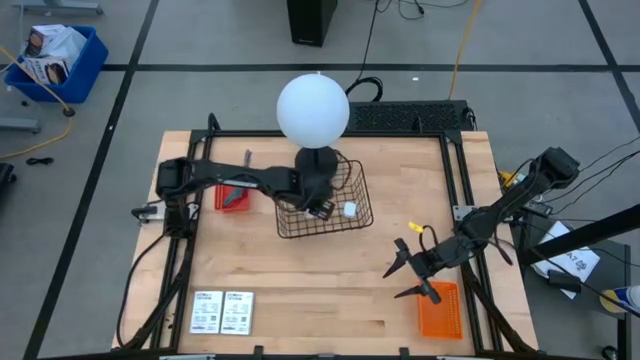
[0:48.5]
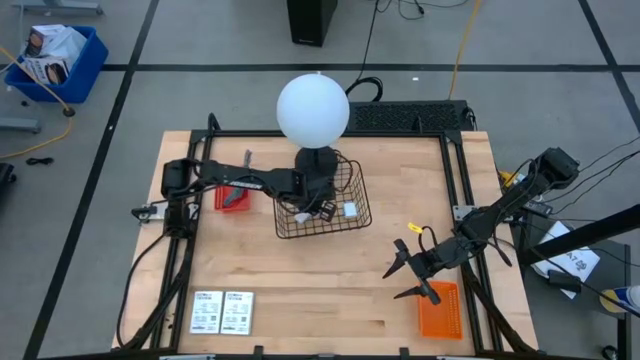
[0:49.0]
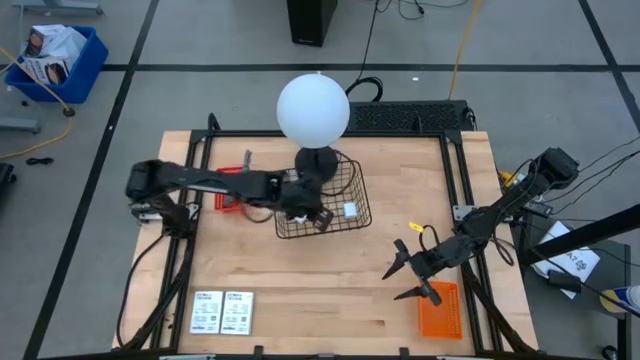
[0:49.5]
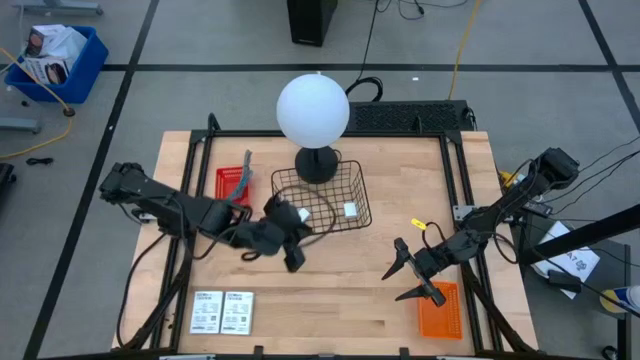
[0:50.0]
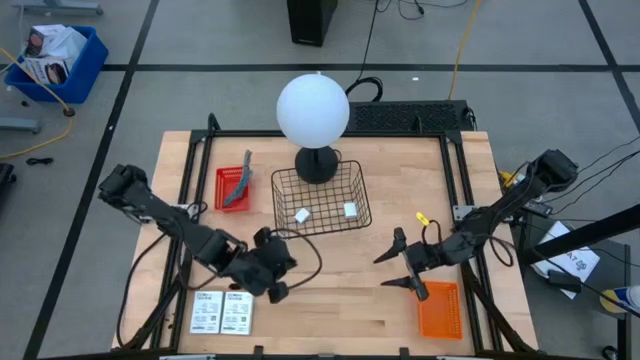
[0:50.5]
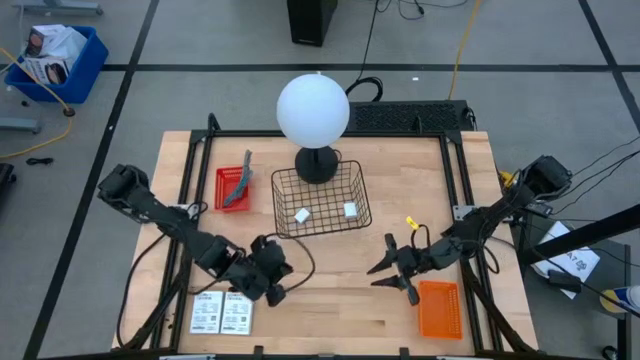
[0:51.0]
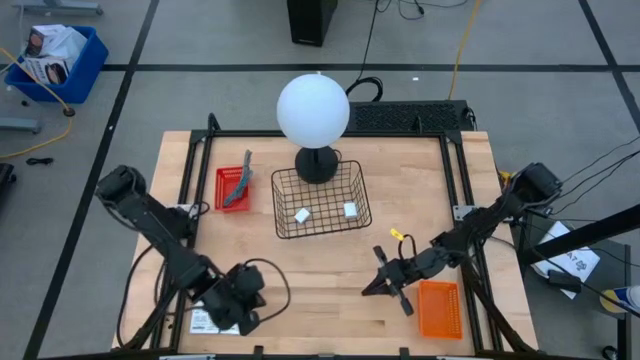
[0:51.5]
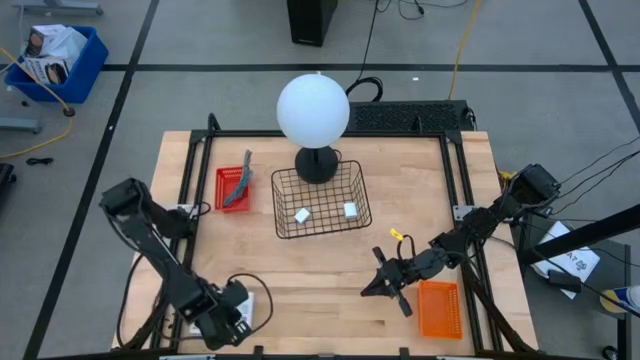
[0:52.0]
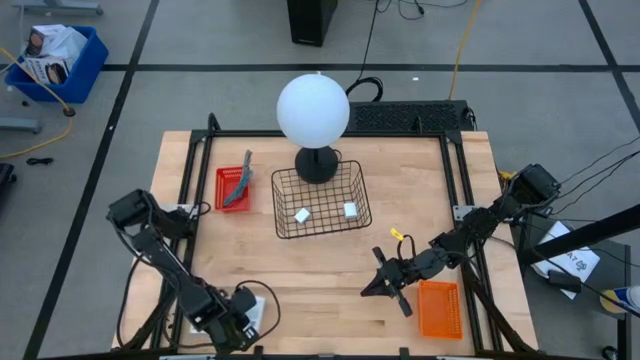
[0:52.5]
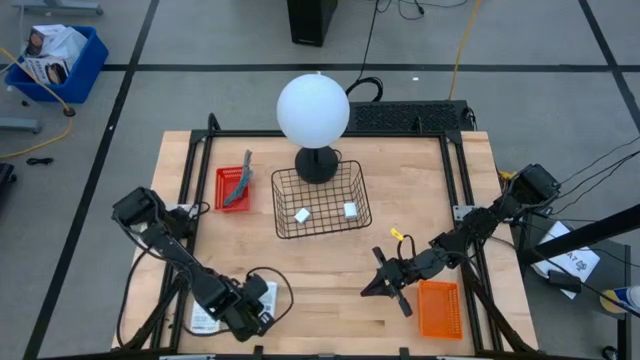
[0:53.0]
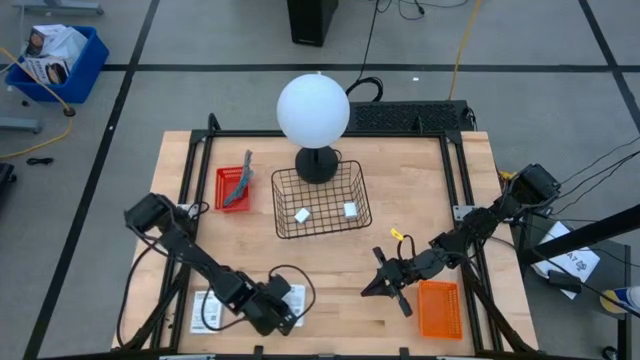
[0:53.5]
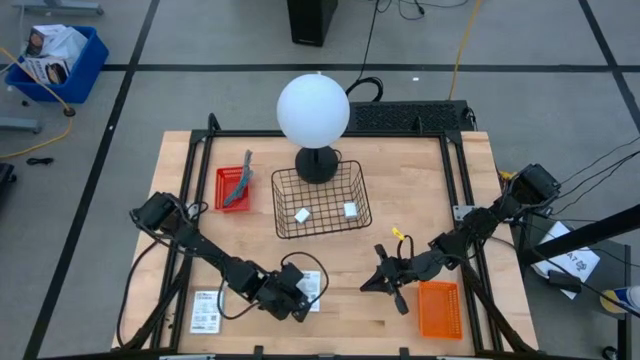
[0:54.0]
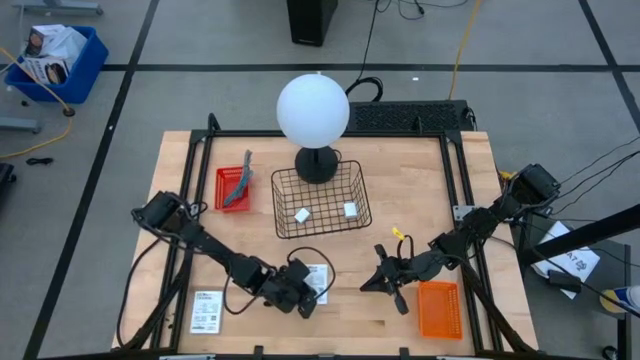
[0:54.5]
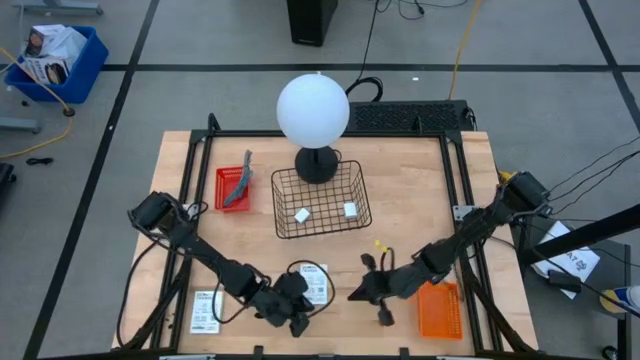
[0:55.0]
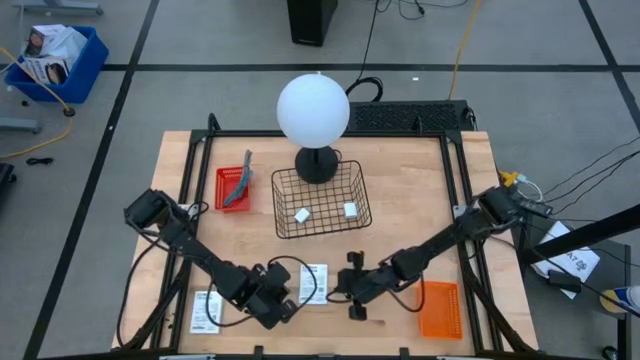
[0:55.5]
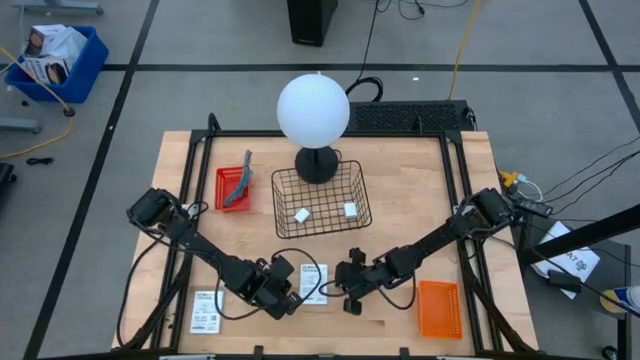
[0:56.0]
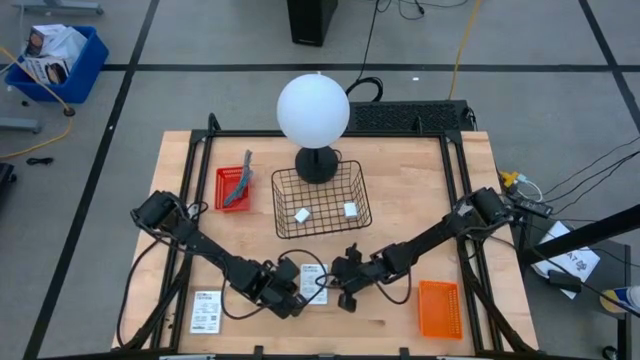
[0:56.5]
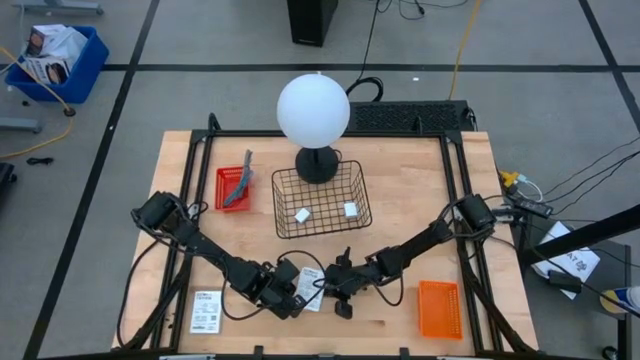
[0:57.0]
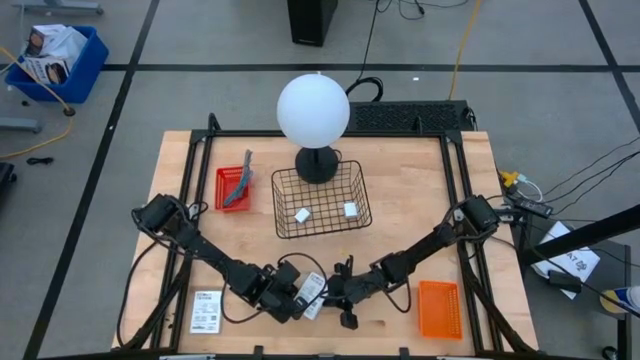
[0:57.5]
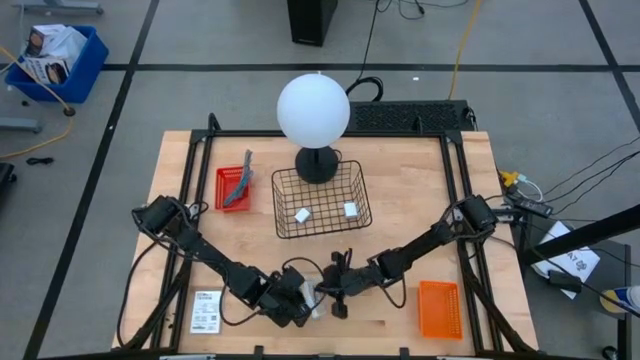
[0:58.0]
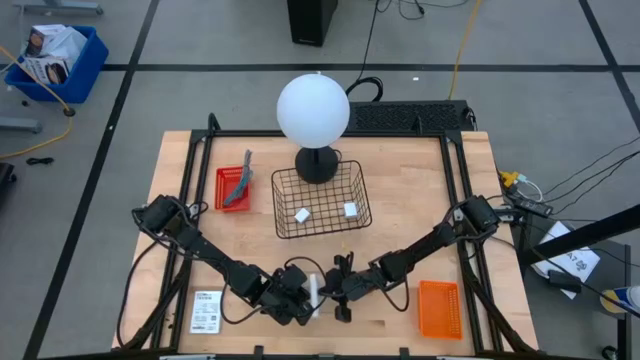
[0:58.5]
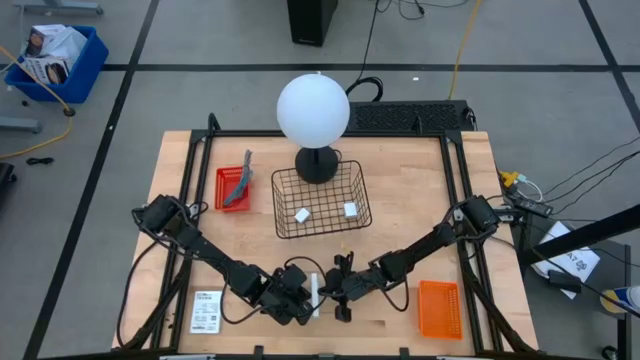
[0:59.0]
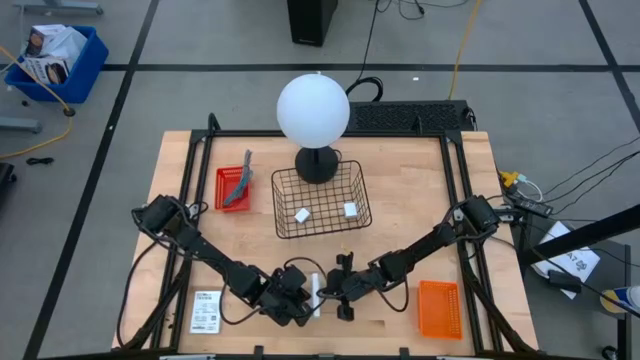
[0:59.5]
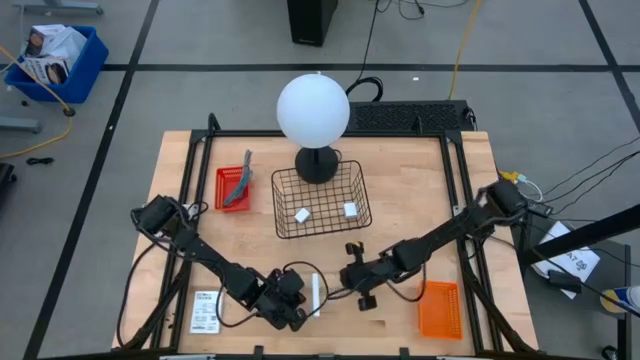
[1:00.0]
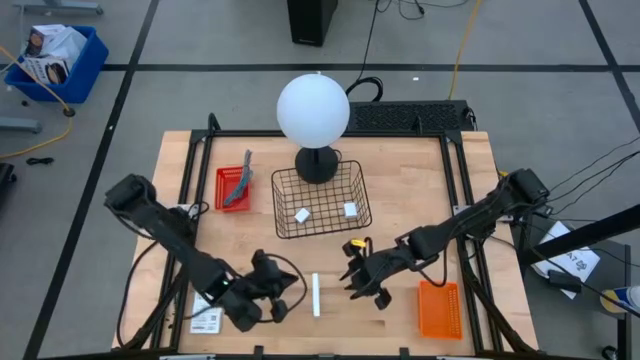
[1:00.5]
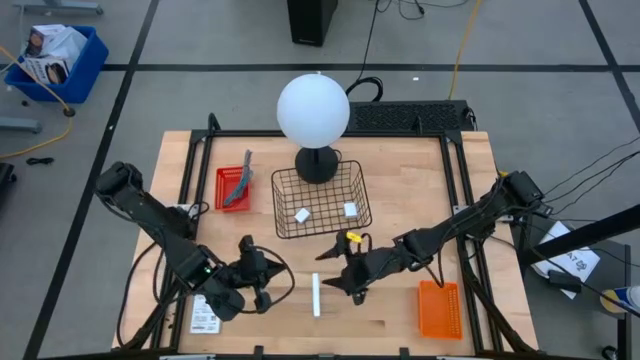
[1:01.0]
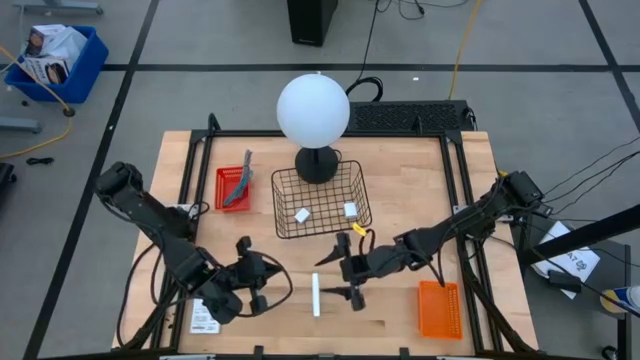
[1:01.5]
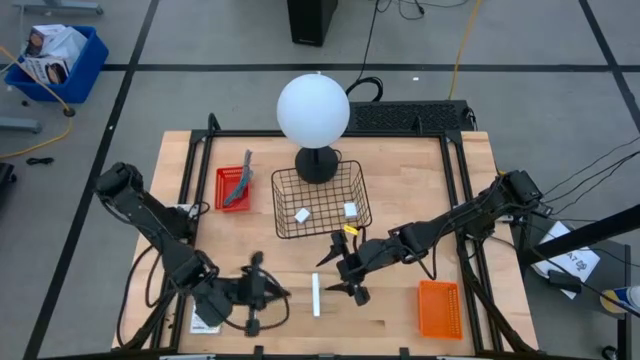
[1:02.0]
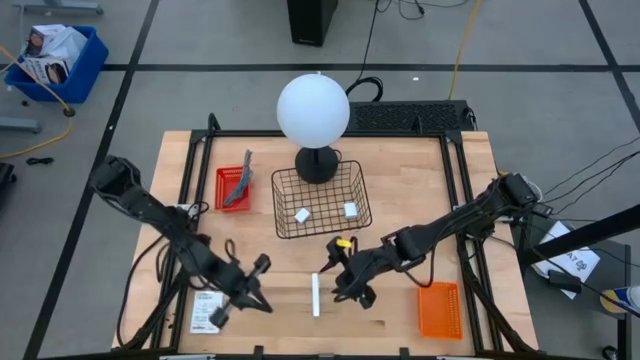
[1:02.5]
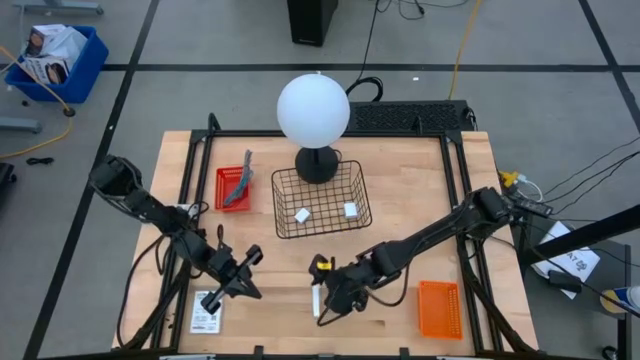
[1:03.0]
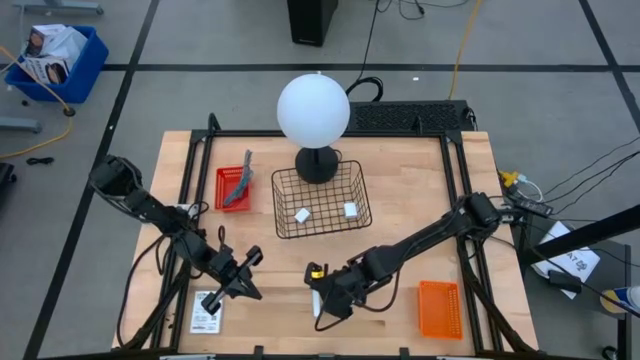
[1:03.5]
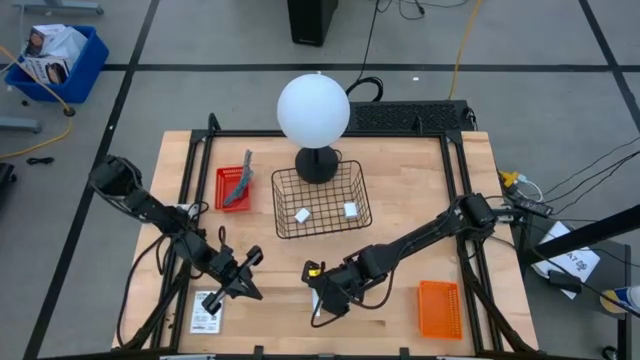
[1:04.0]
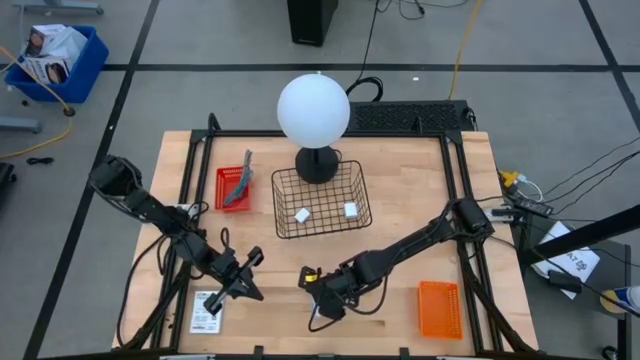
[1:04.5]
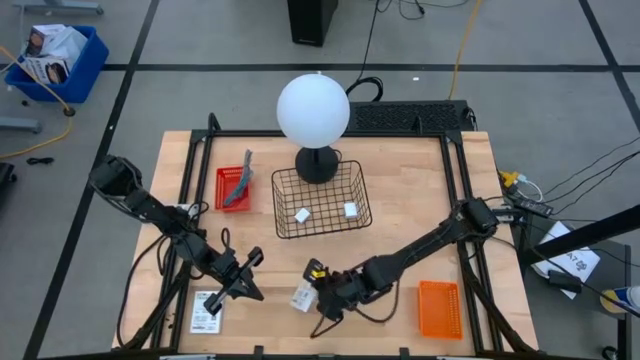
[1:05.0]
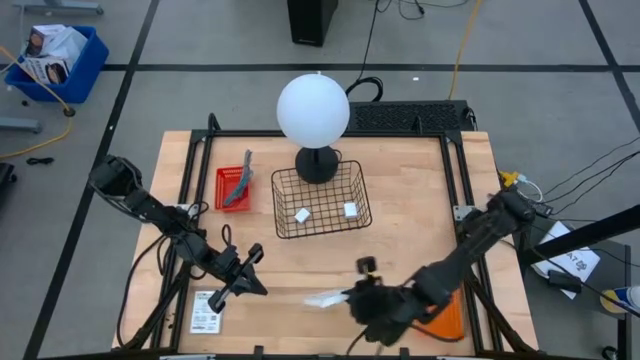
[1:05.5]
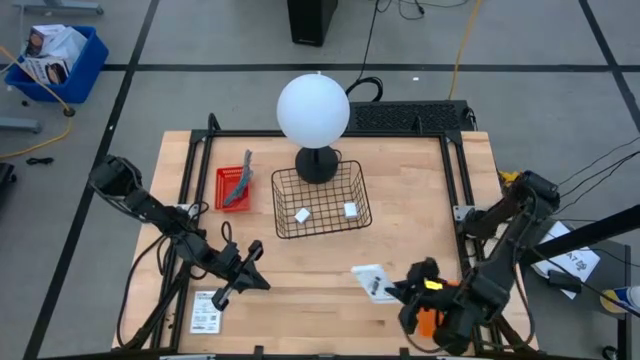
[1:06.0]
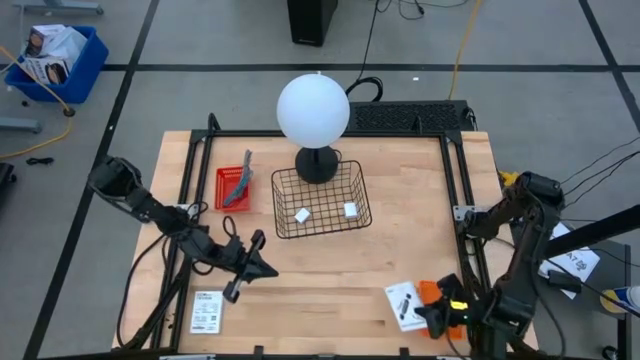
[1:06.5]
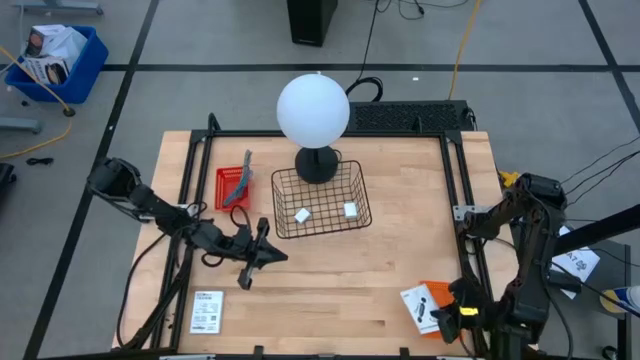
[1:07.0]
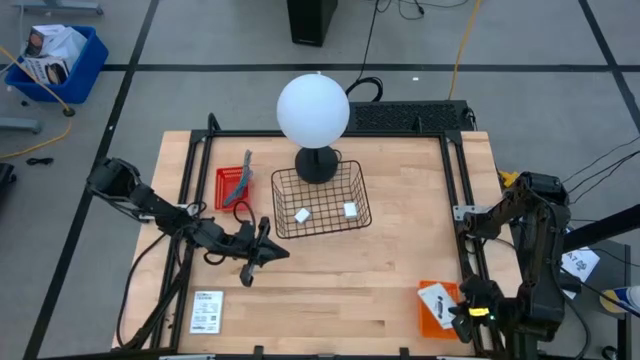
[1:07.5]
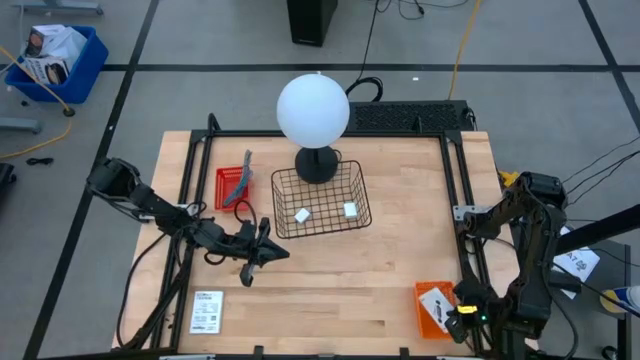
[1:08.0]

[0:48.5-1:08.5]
Task: Pick and place items into bin
Put the right white card reader box into the orange bin

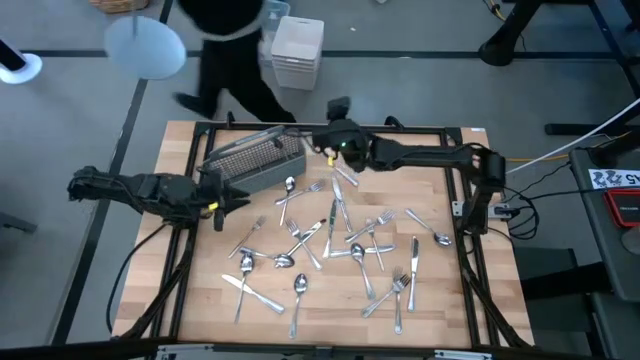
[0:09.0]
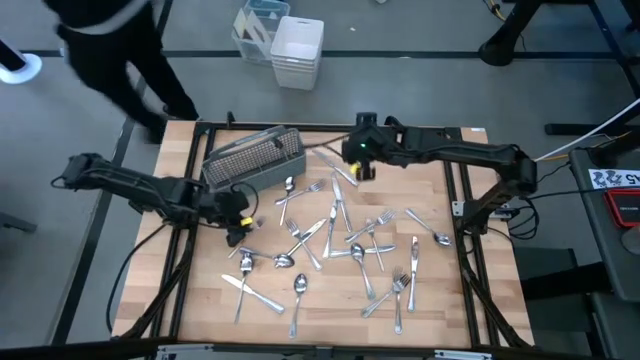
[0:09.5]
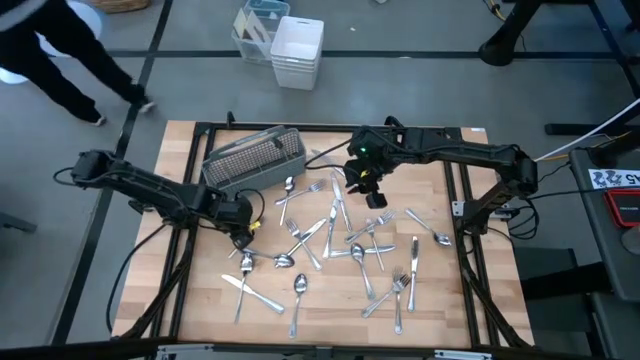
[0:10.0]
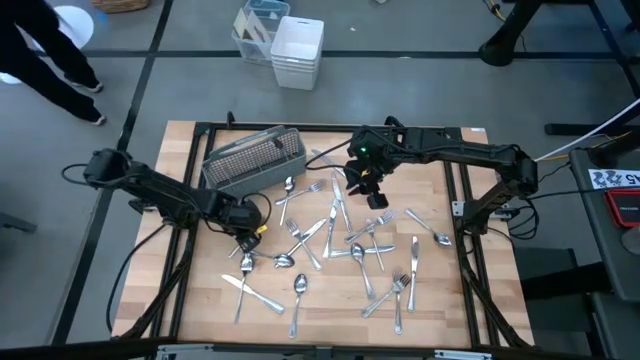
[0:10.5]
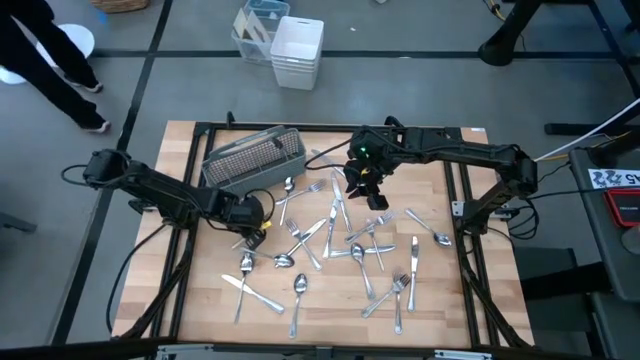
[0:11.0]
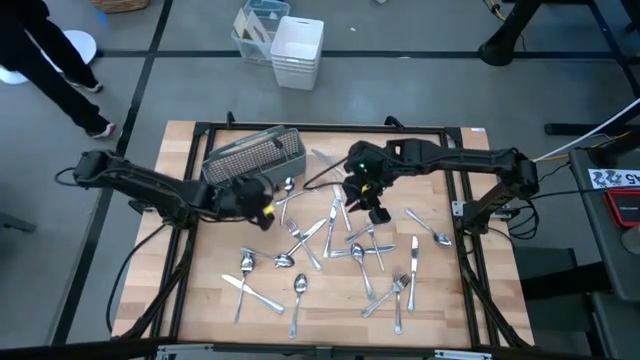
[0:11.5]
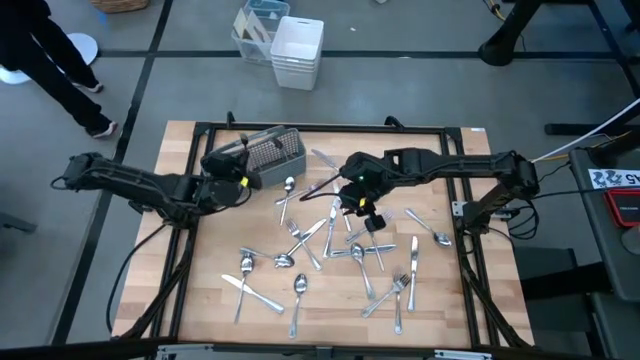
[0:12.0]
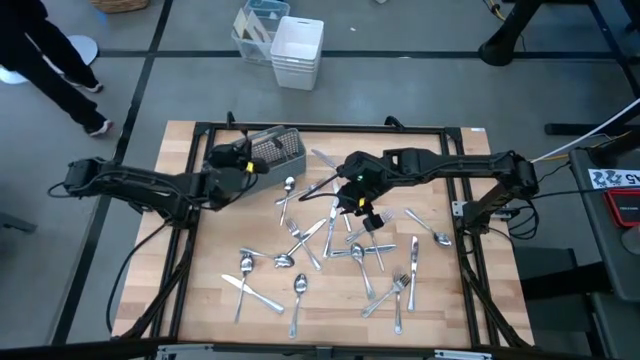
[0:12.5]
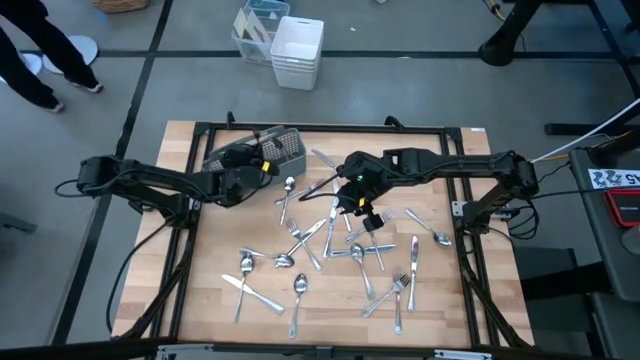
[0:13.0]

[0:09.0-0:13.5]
Task: Sort silverware
Put the silver fork into the silverware rack
